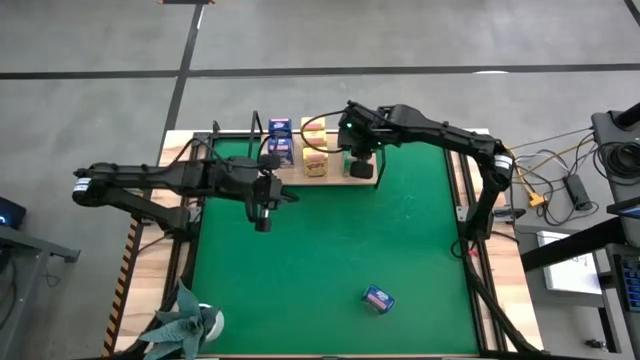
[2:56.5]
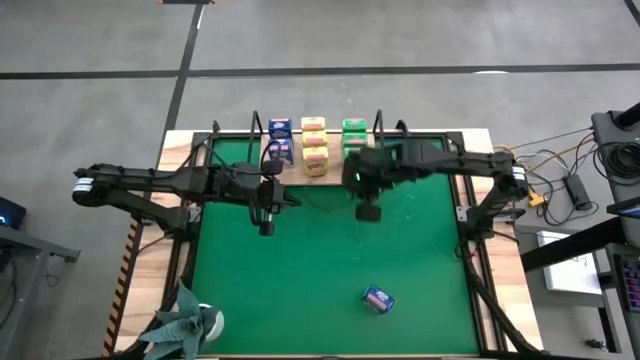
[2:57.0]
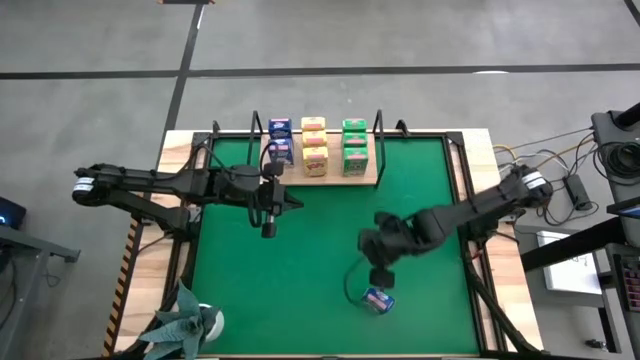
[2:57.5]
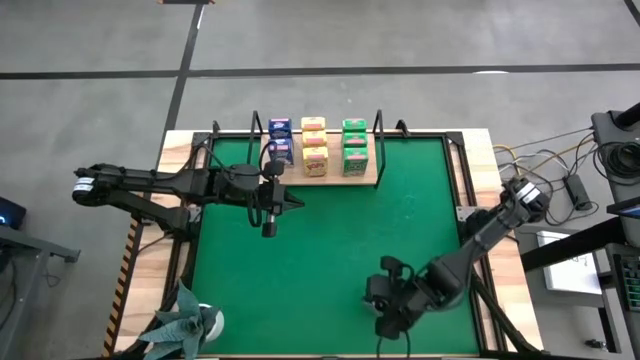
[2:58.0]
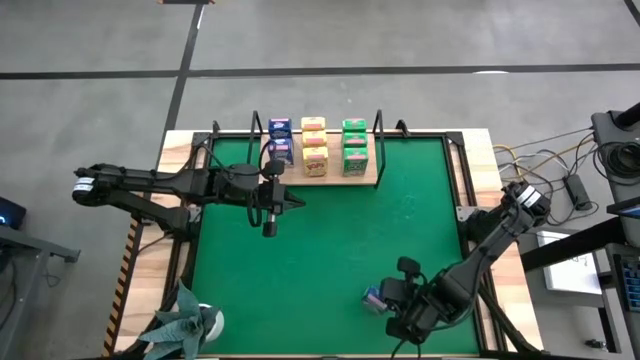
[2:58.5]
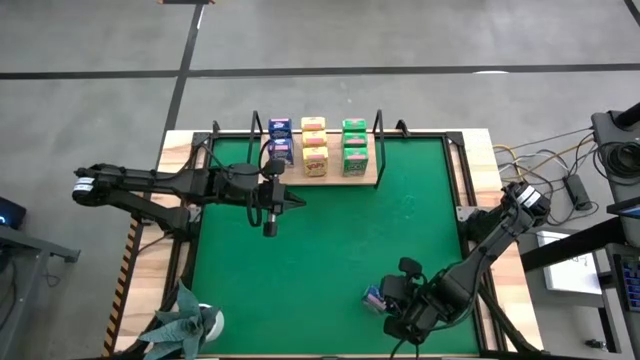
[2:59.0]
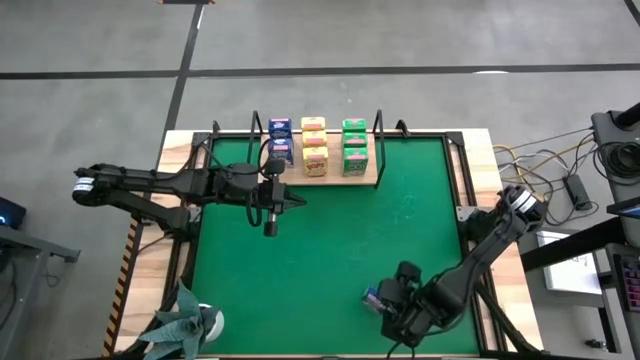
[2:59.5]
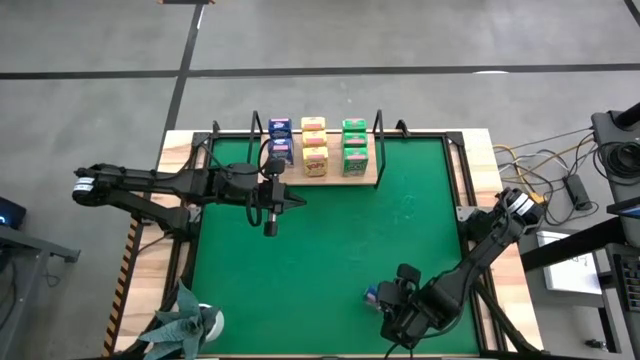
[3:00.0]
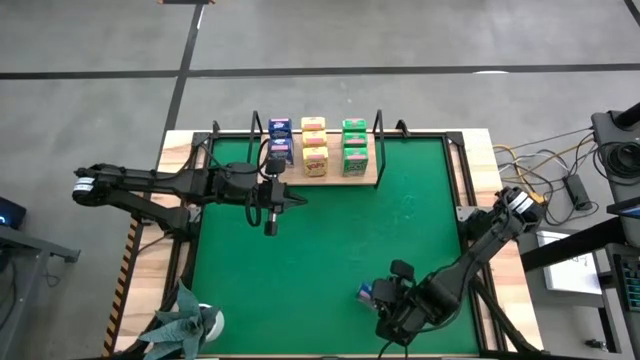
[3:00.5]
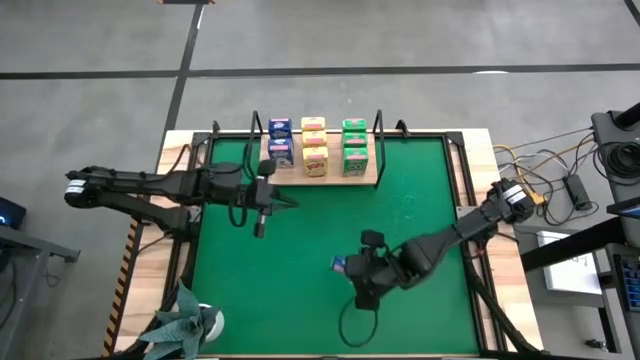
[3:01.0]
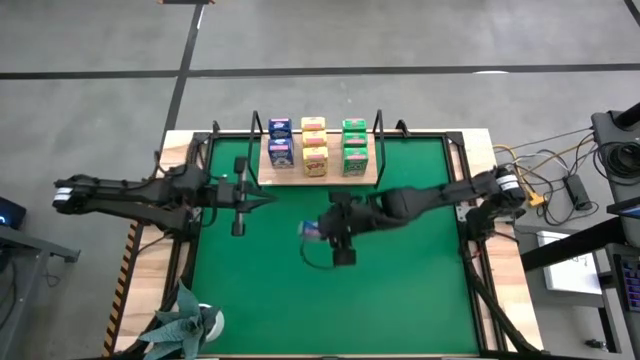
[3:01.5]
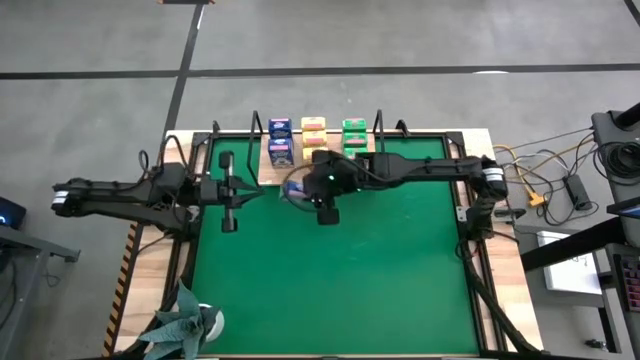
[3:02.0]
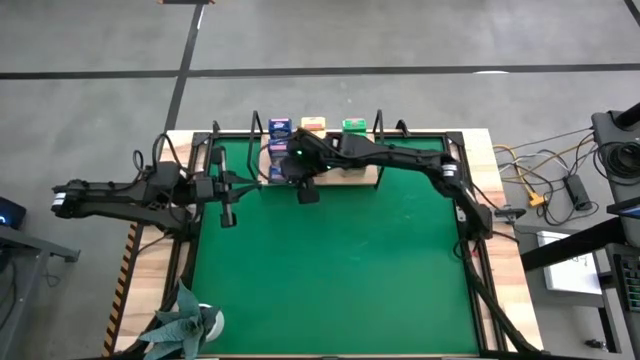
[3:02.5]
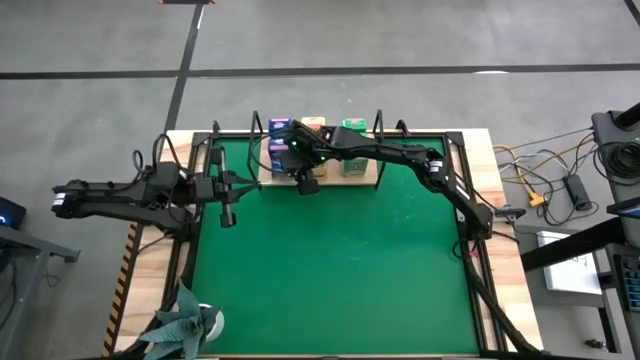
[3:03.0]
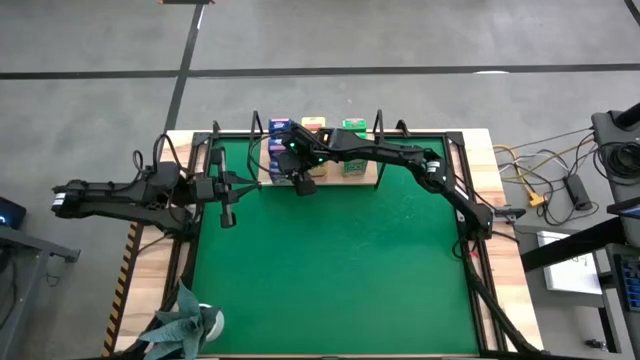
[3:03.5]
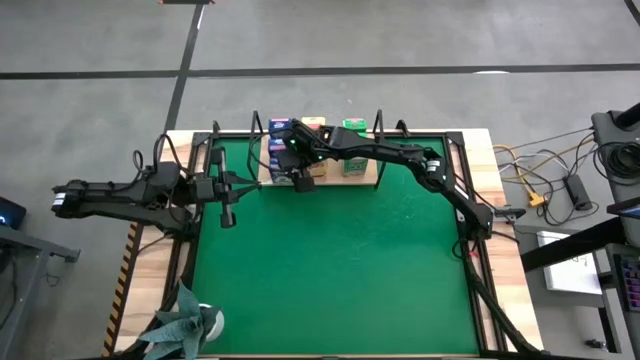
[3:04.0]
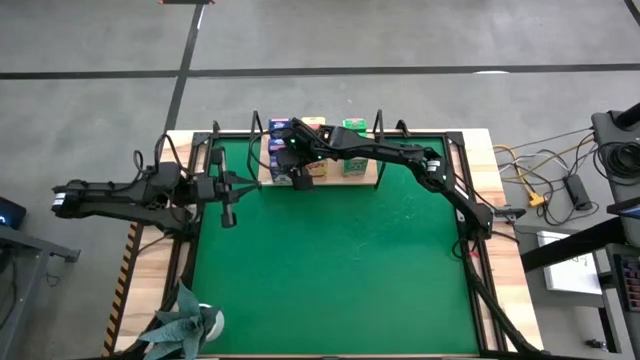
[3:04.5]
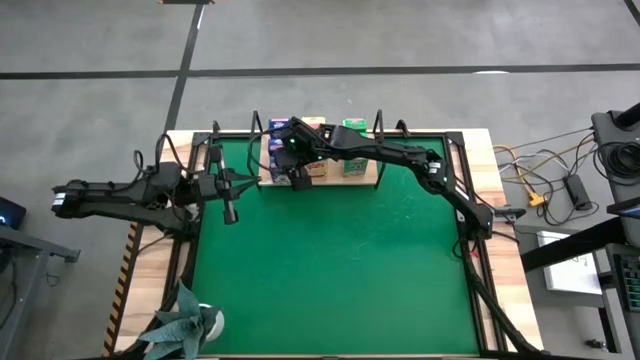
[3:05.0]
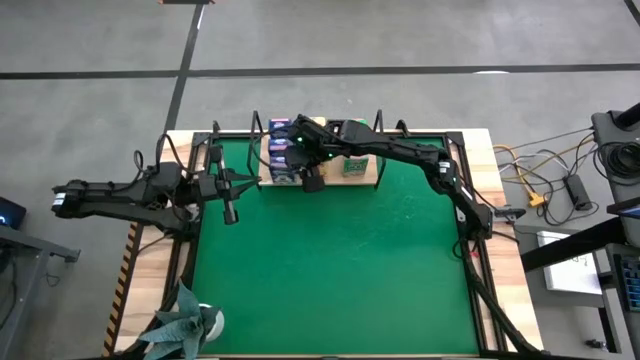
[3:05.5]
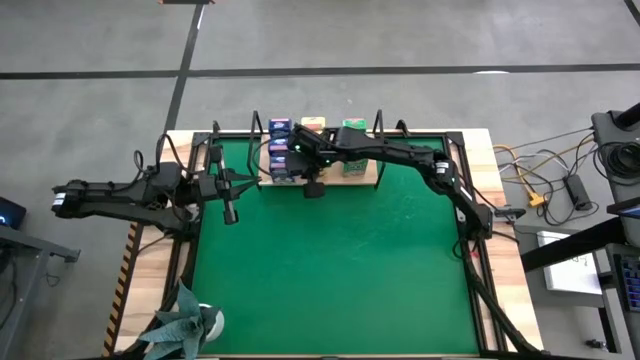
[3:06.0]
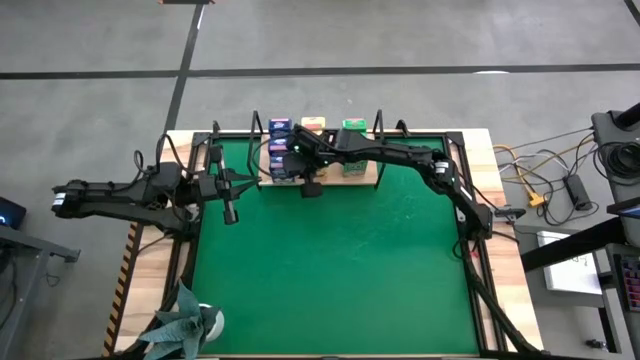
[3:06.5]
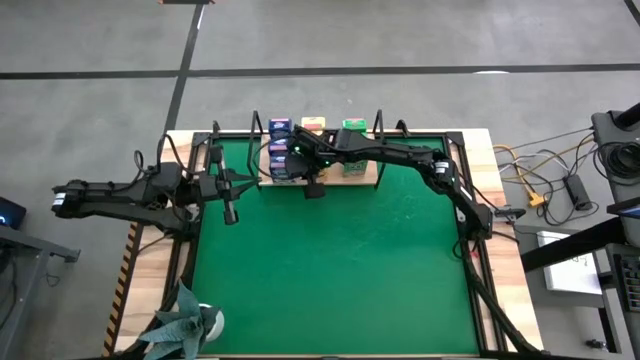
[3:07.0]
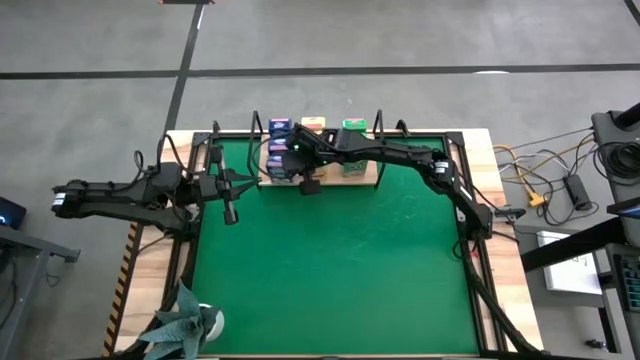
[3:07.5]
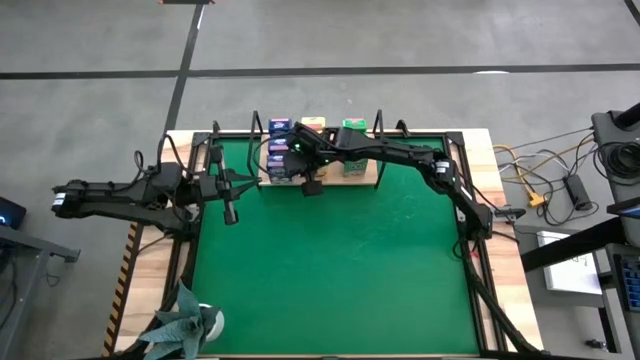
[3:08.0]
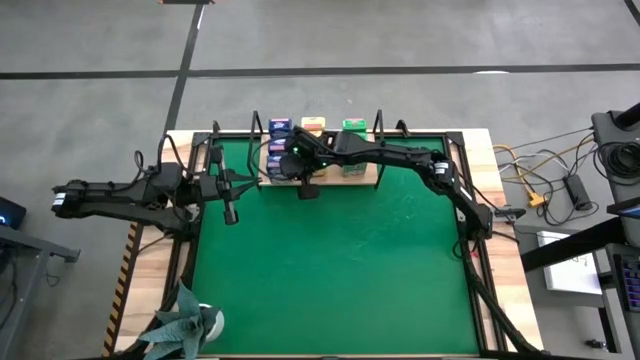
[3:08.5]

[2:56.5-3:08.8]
Task: Stack cereal on shelf
Put the blue cereal box on the shelf aligned with the other blue cereal boxes

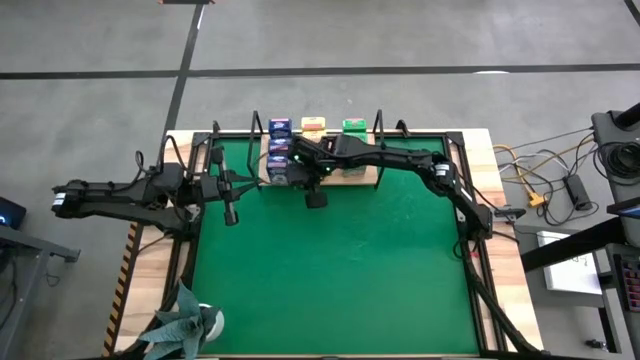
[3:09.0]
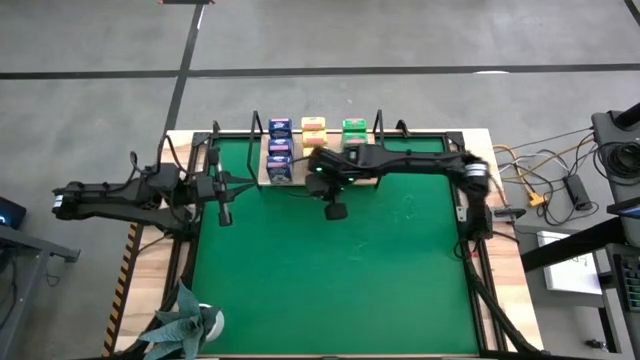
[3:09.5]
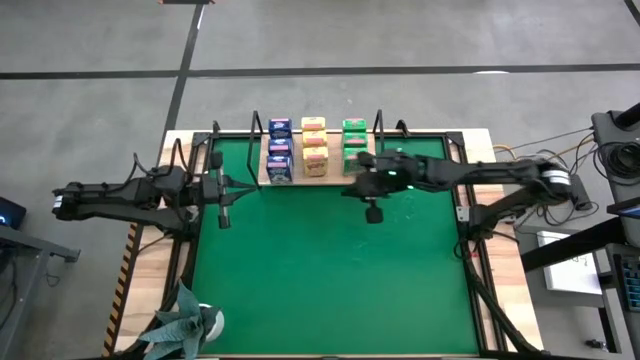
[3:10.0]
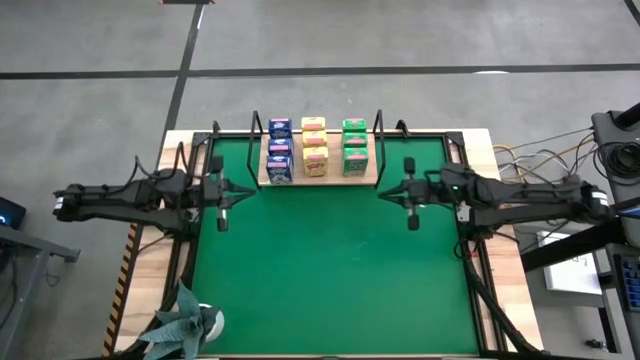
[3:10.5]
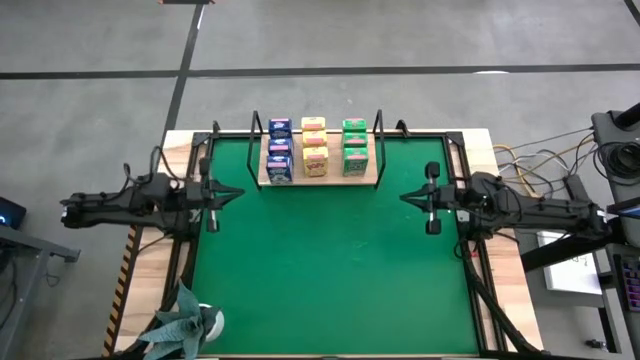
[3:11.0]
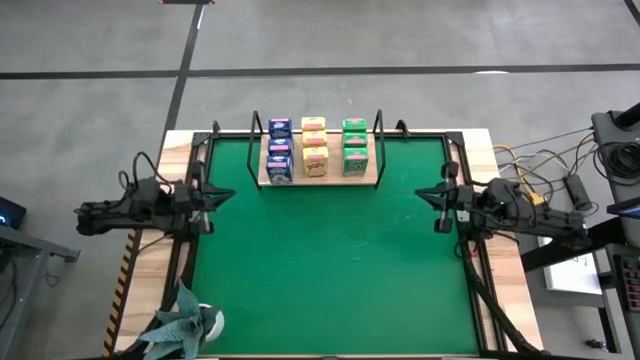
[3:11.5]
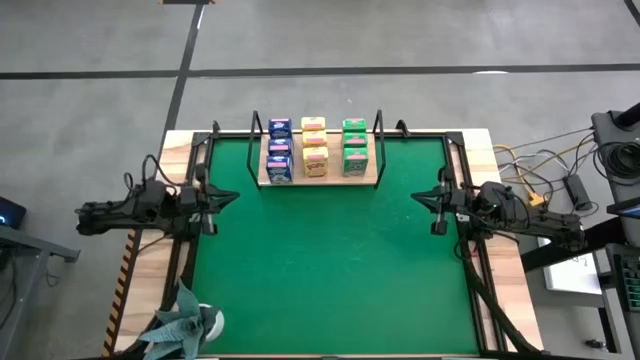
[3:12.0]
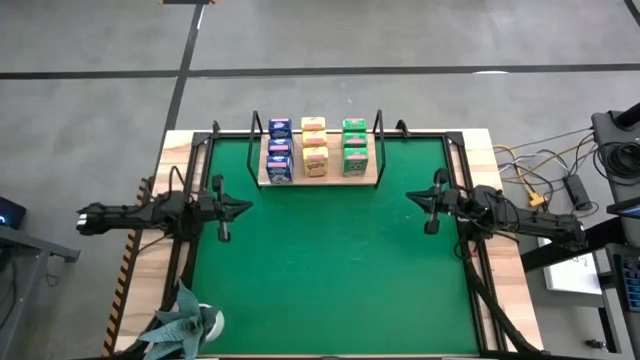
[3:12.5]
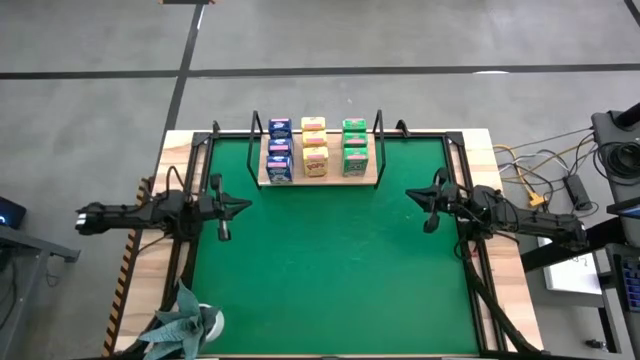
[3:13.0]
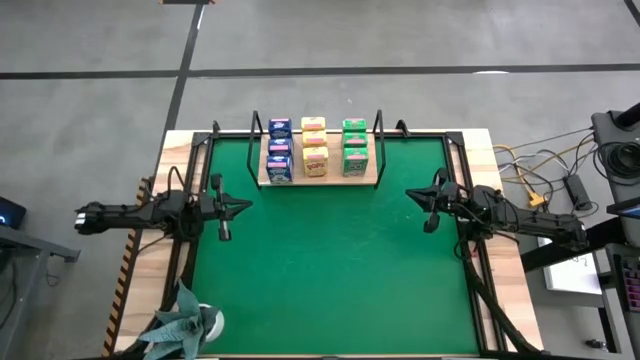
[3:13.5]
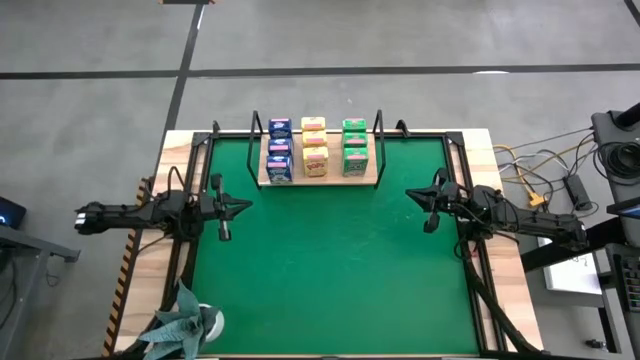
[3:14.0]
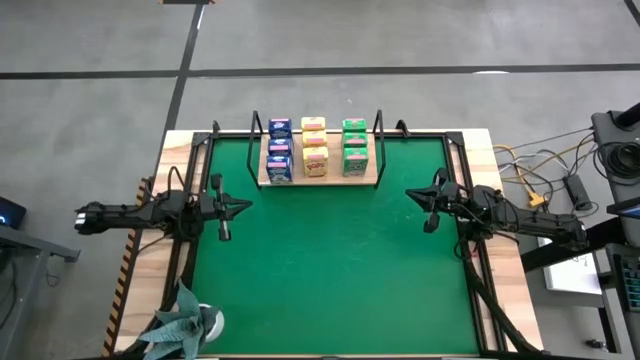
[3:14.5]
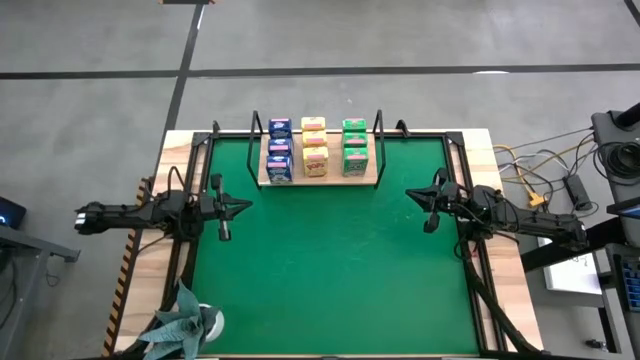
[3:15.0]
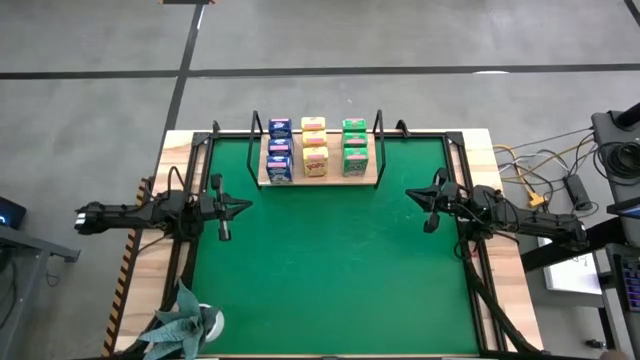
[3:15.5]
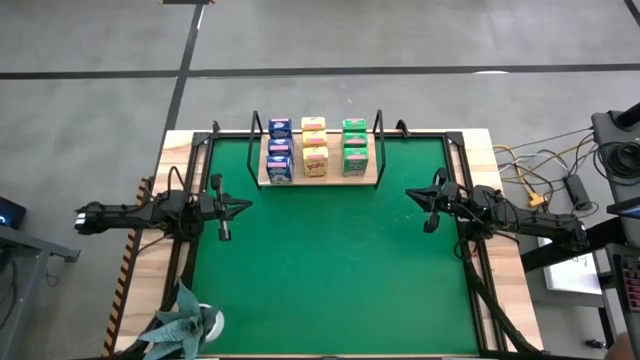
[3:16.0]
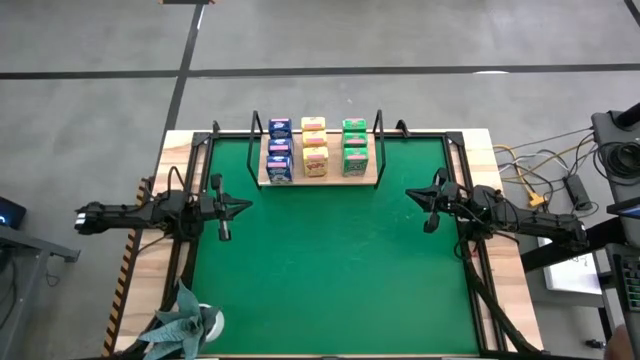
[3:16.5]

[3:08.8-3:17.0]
Return to Home Position

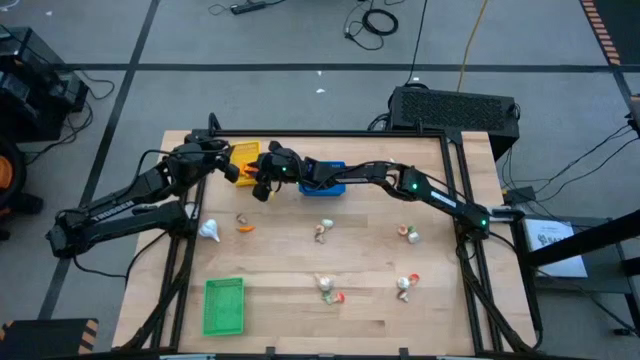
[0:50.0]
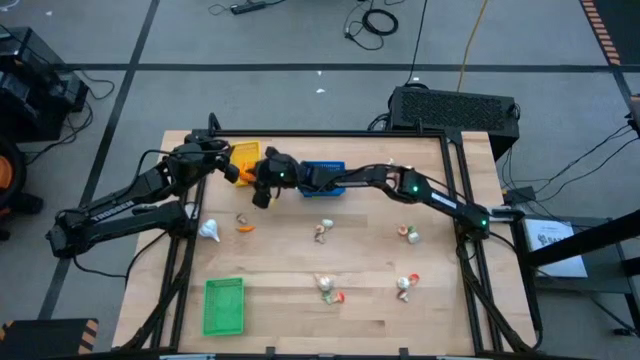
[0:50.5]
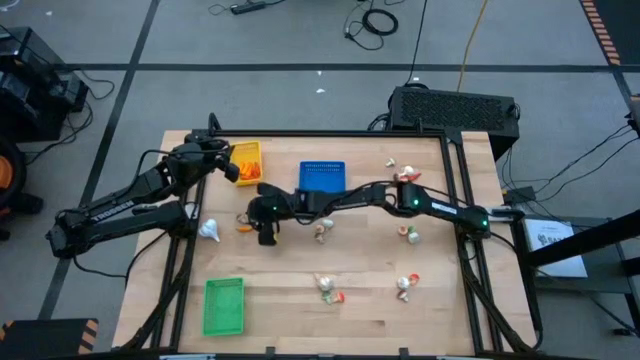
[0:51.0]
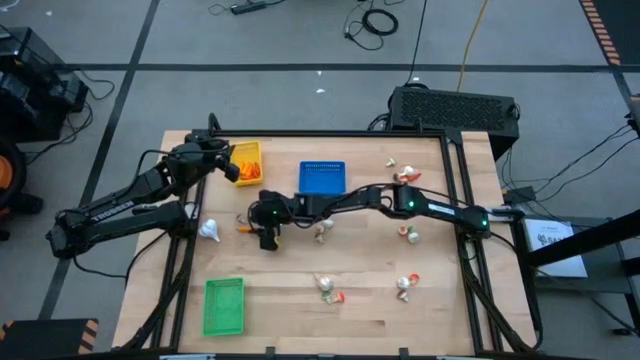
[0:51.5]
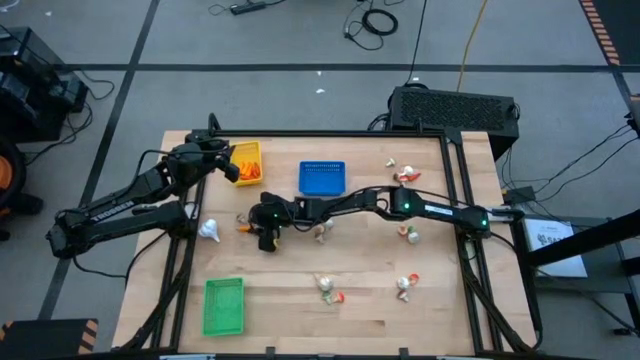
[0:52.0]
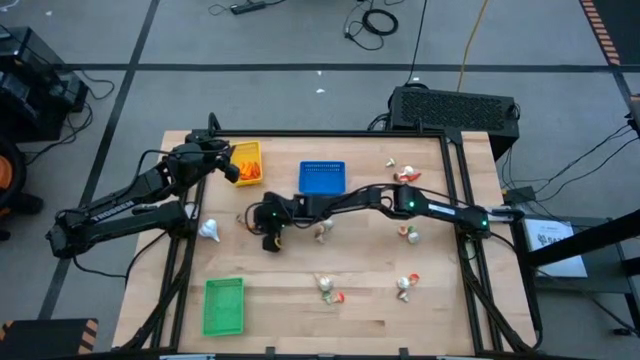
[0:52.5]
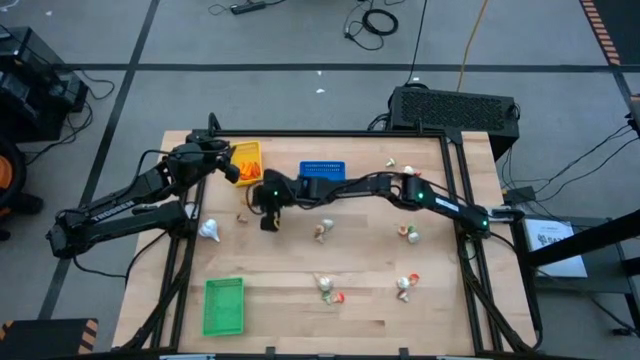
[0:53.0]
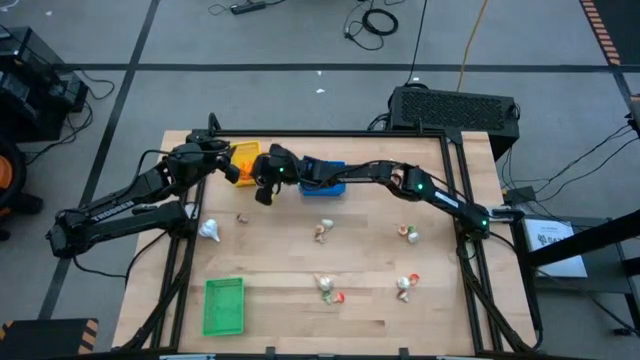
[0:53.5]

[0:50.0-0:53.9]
Task: Sort produce into baskets
Put the yellow chili pepper into the yellow bin
